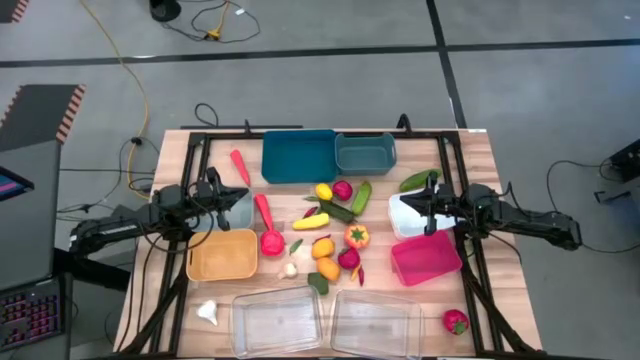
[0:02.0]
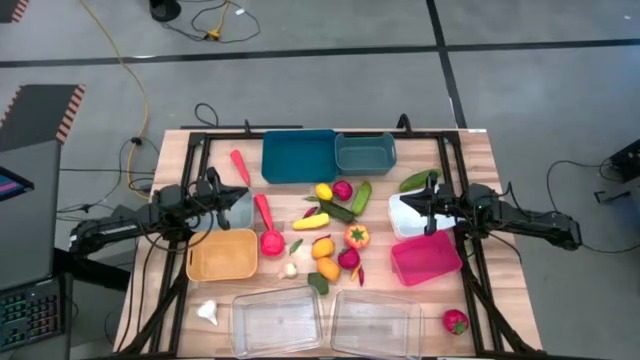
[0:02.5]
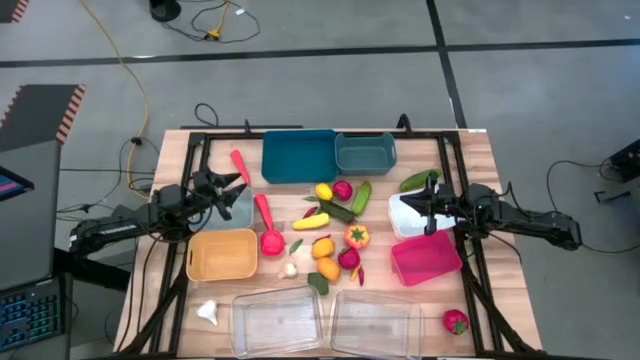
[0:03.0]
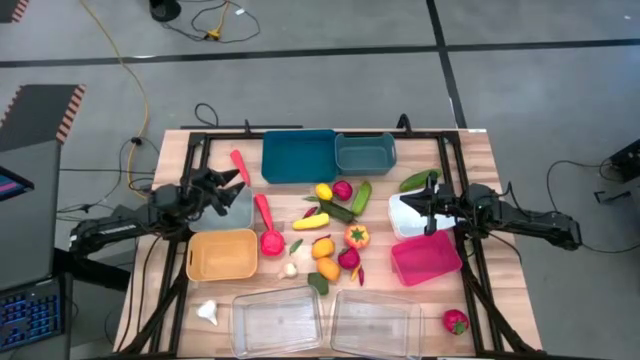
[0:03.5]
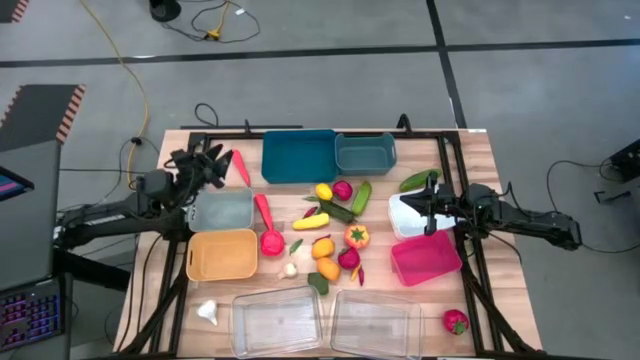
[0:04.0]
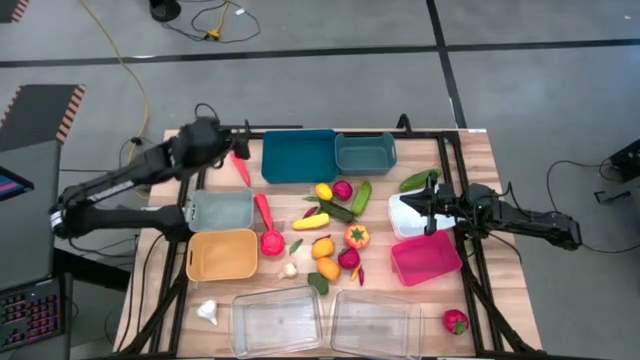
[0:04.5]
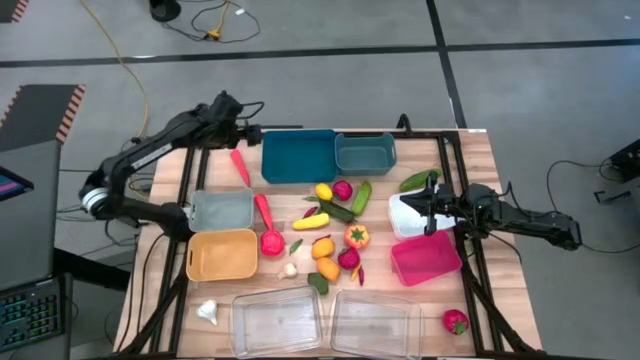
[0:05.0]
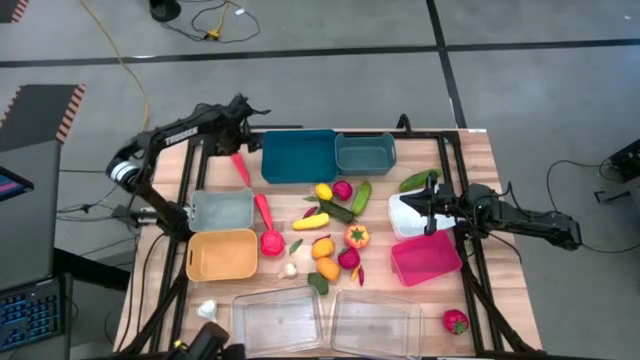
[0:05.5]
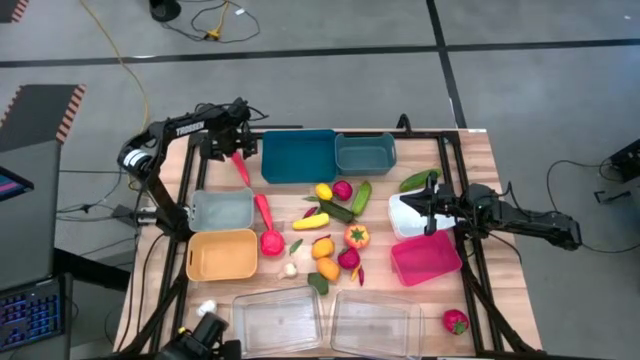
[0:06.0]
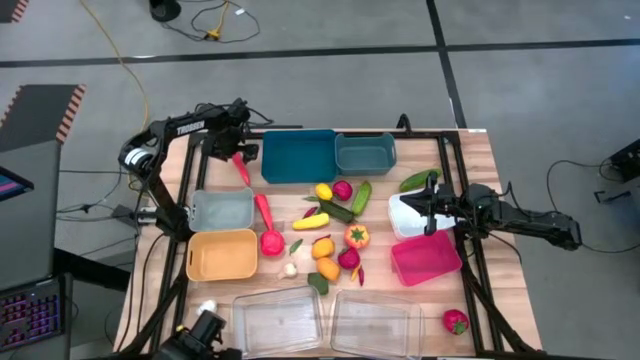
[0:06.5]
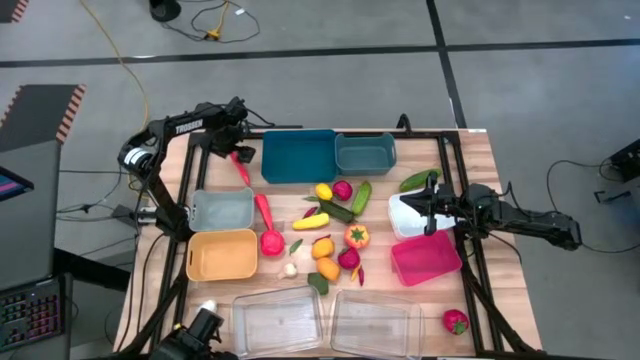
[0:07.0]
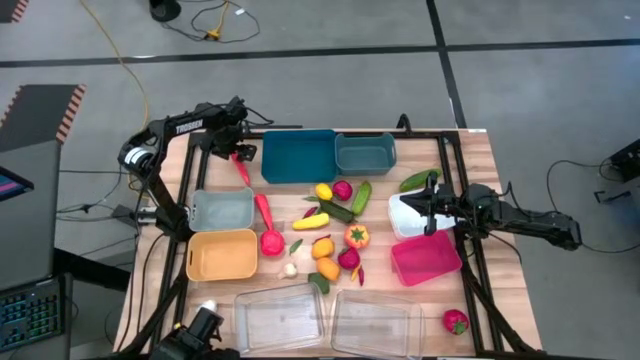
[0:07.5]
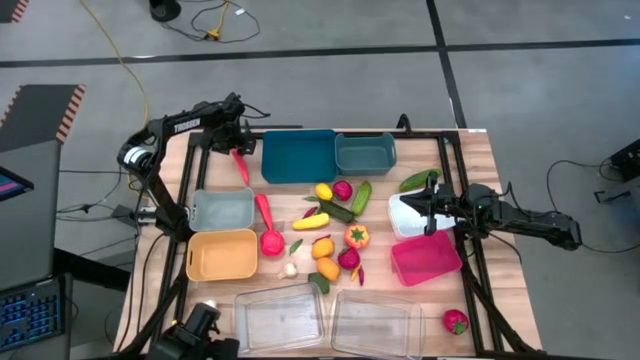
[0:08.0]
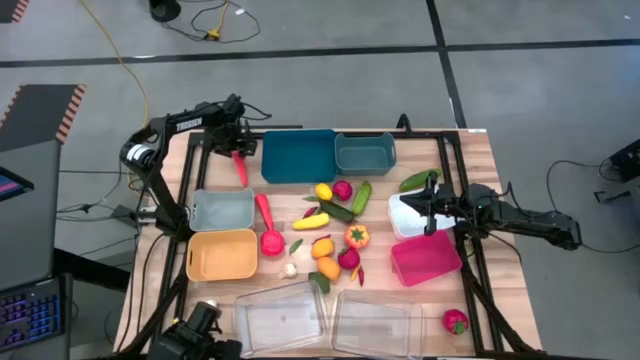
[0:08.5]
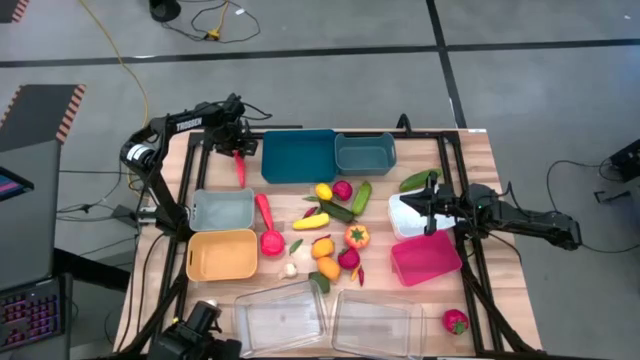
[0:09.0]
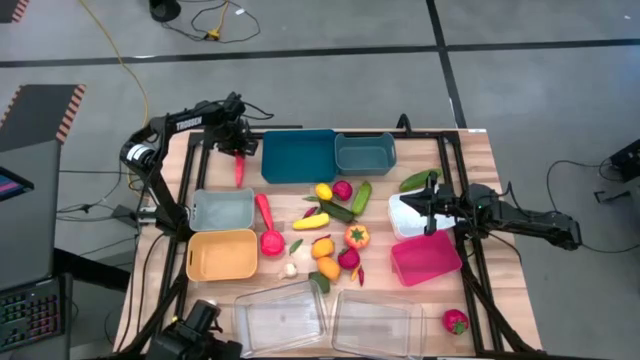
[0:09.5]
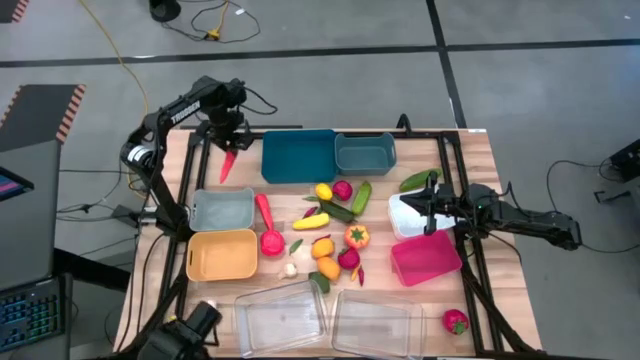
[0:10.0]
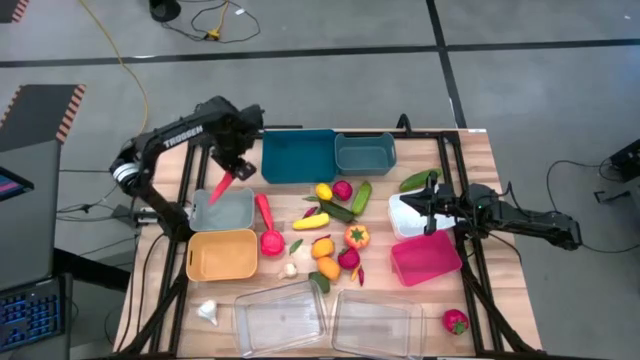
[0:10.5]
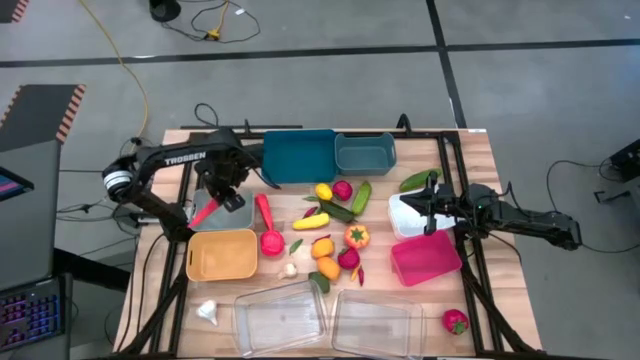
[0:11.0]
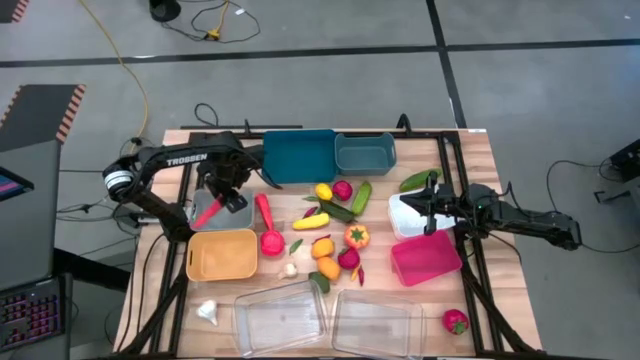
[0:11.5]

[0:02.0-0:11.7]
Task: Sort produce into baskets
Put the red chili pepper into the gray bin

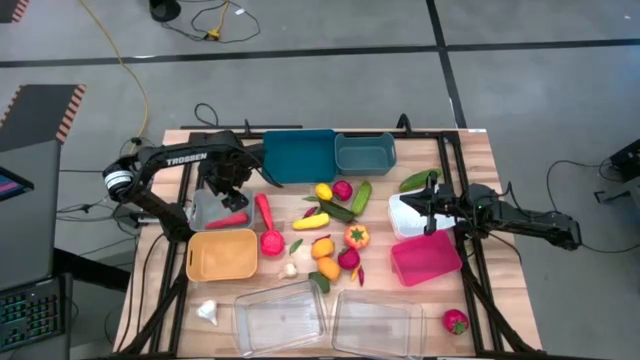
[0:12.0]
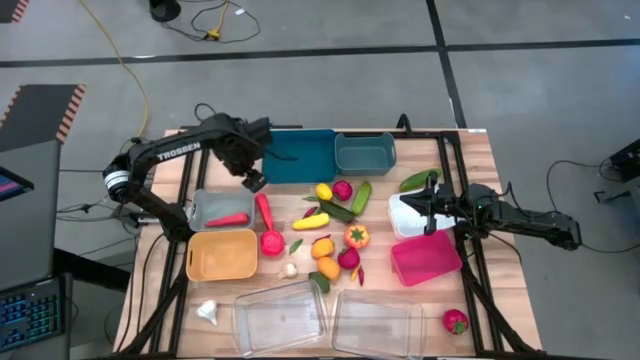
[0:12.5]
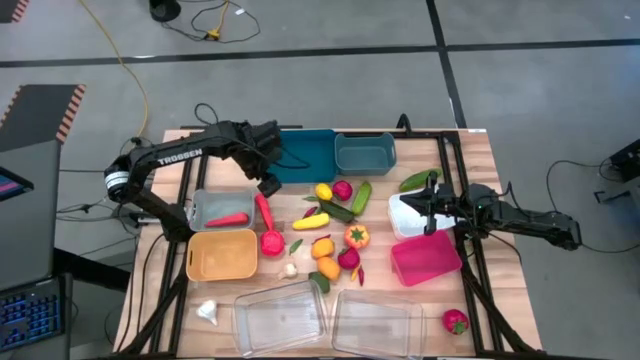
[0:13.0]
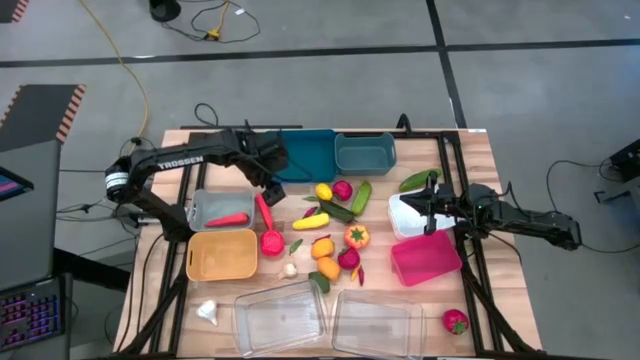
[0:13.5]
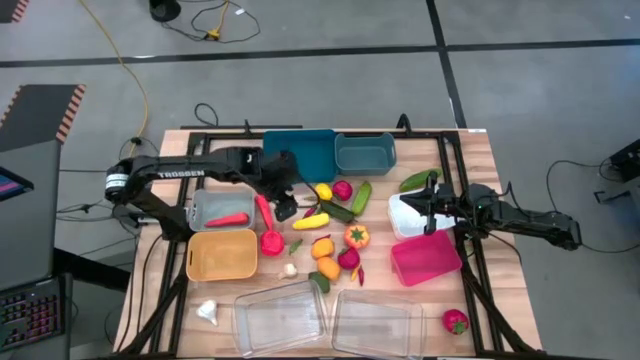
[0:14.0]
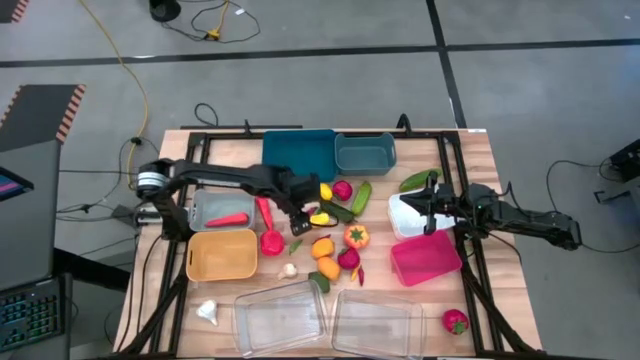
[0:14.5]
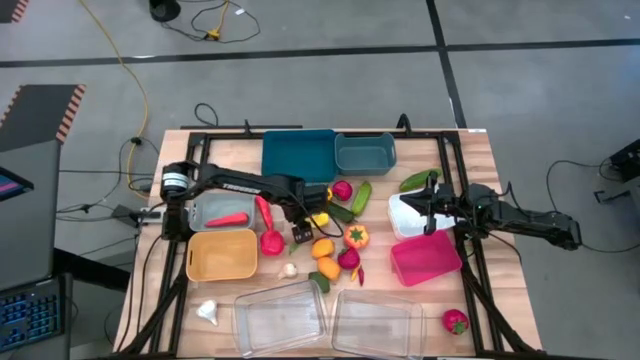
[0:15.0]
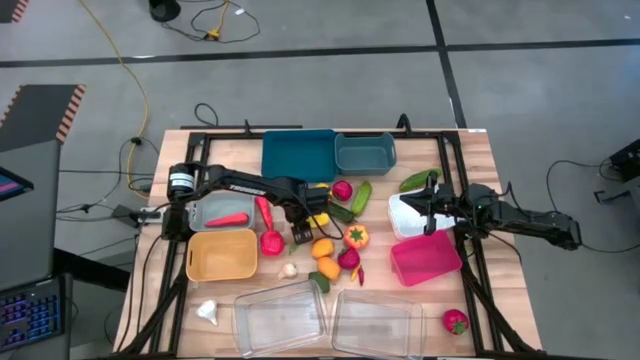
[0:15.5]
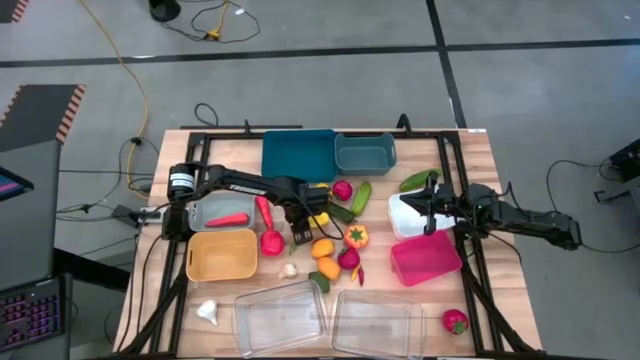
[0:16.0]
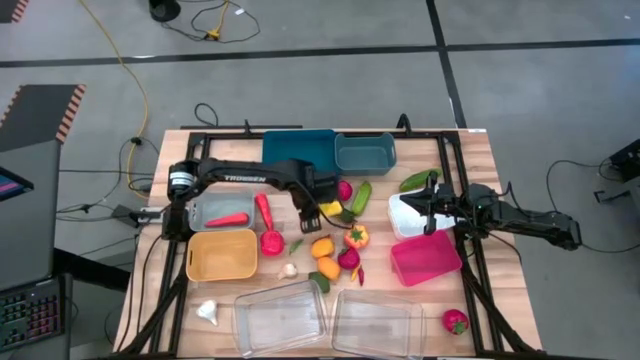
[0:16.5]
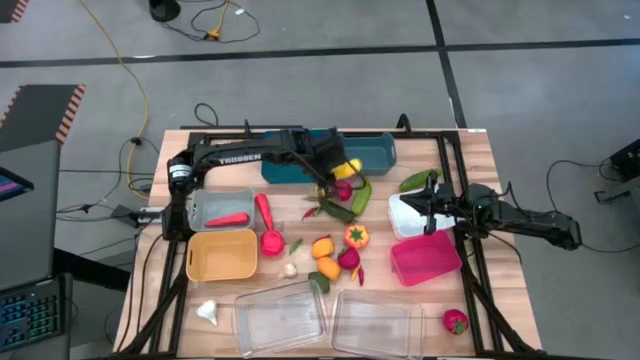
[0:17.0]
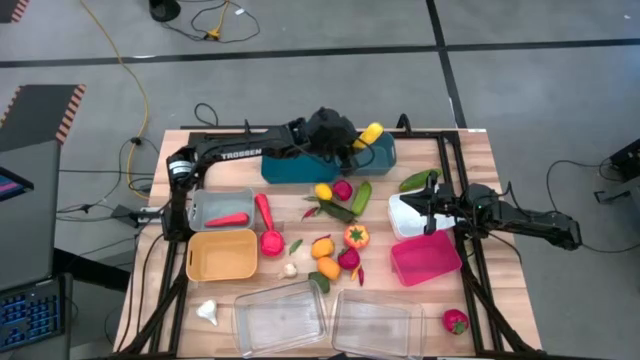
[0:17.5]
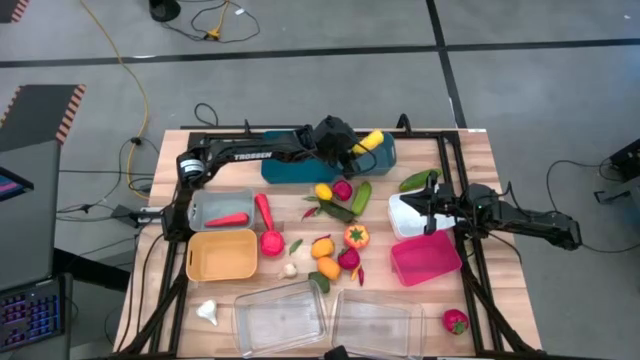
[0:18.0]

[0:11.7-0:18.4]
Put the yellow corn into the dark green bin

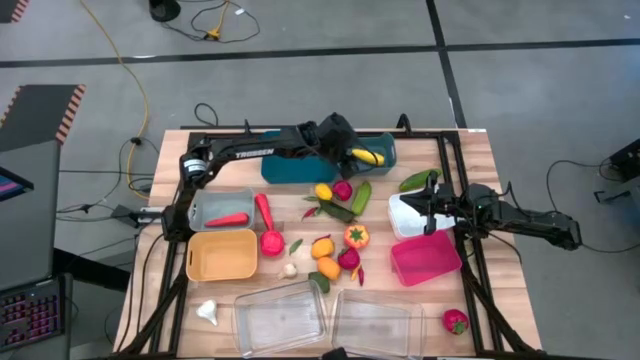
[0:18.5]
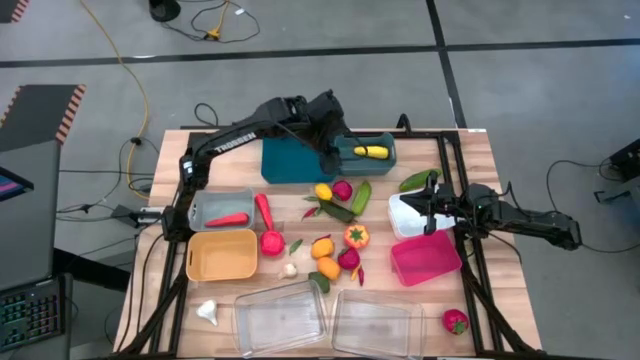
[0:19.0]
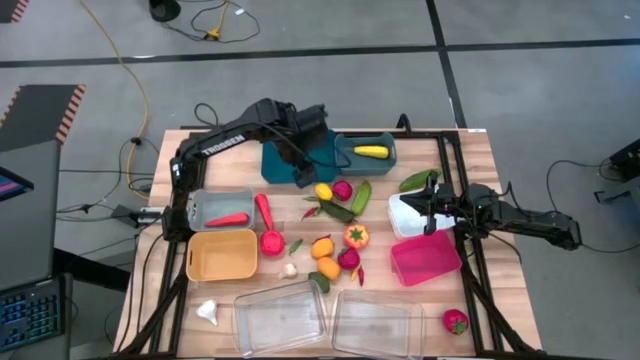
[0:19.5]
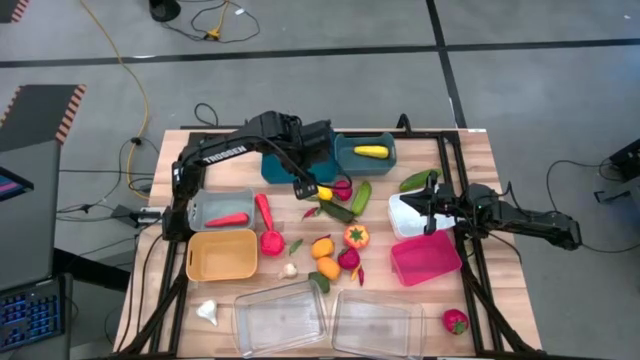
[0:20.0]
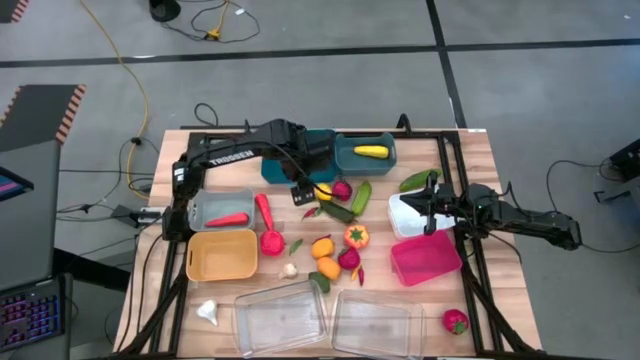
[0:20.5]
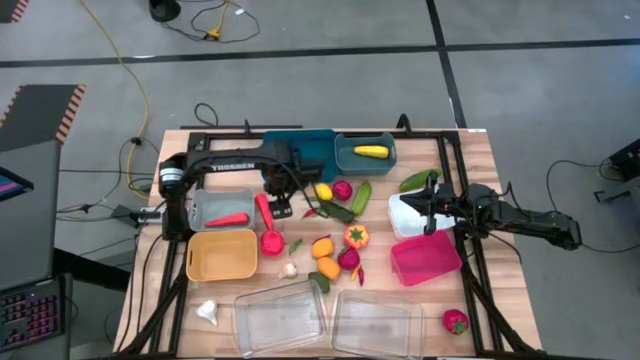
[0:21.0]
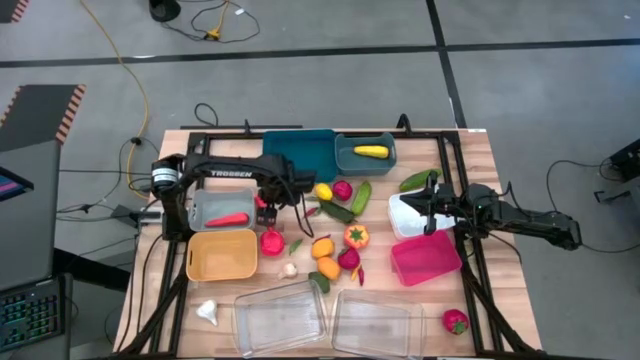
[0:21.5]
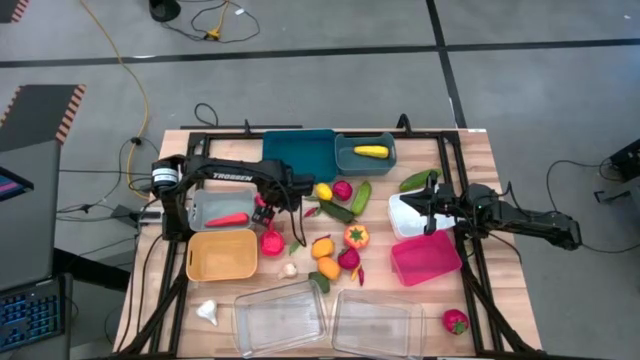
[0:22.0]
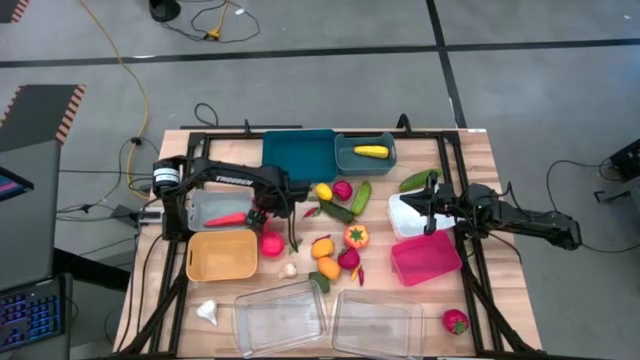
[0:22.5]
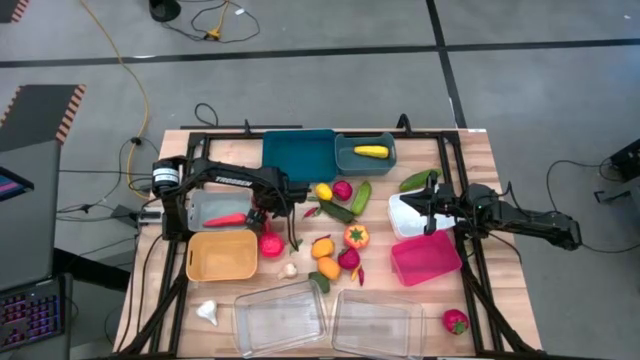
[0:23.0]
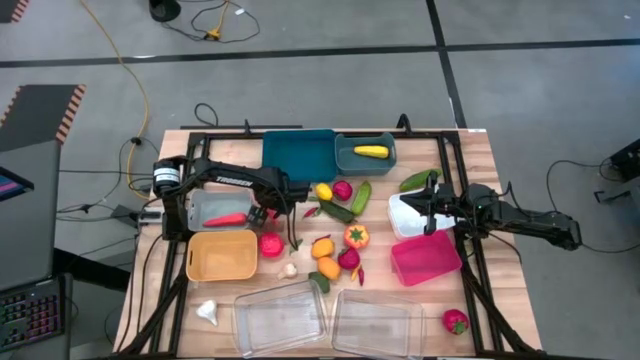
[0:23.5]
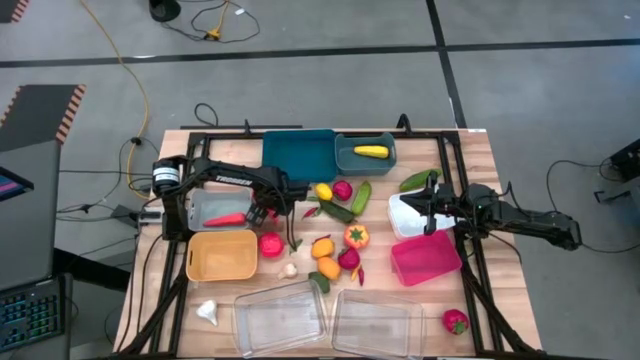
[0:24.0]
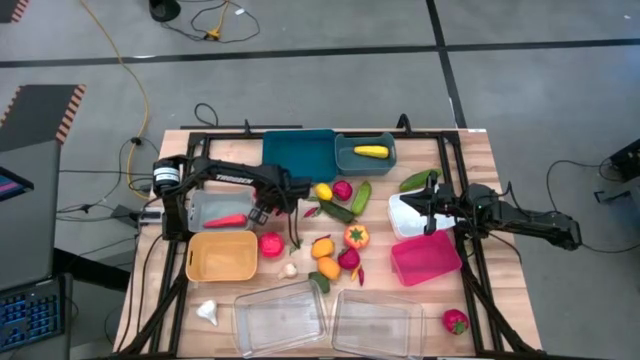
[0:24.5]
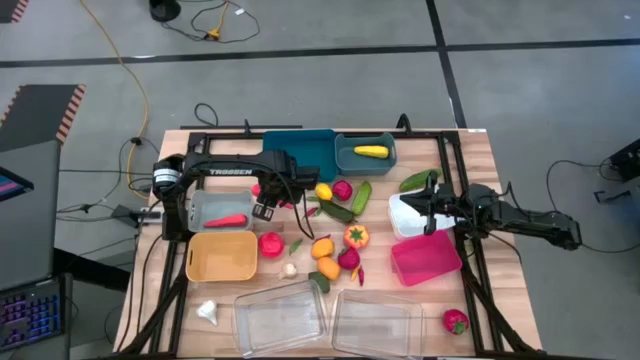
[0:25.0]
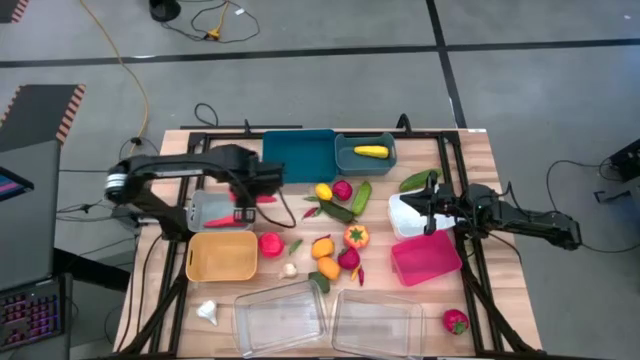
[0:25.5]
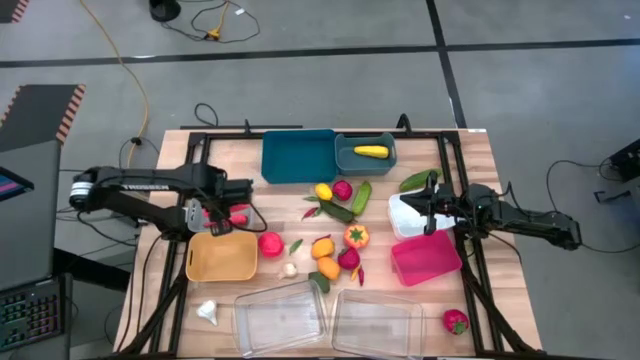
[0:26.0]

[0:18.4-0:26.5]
Put the red chili pepper into the gray bin
